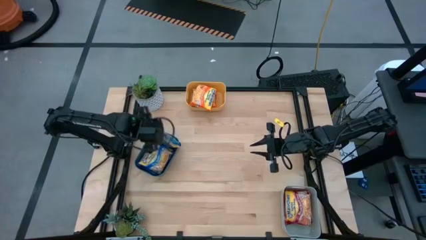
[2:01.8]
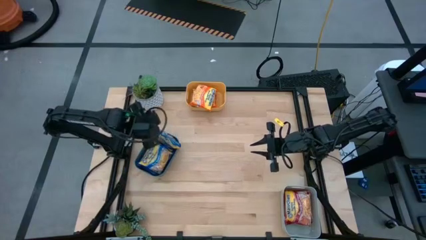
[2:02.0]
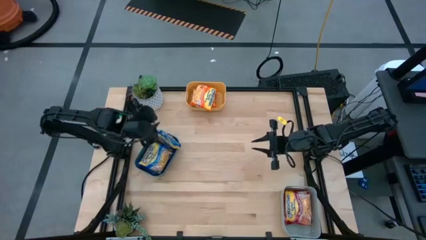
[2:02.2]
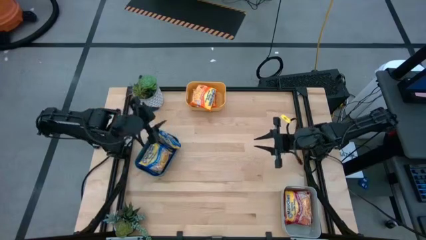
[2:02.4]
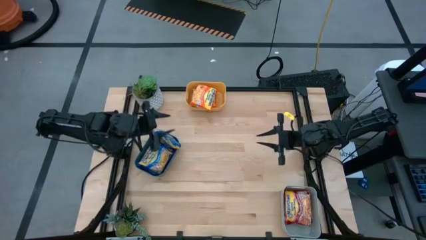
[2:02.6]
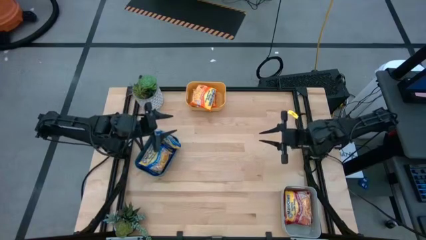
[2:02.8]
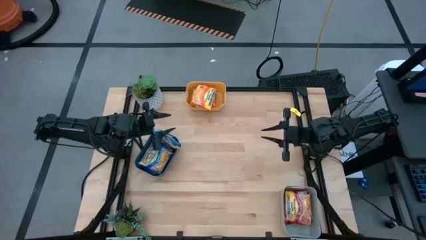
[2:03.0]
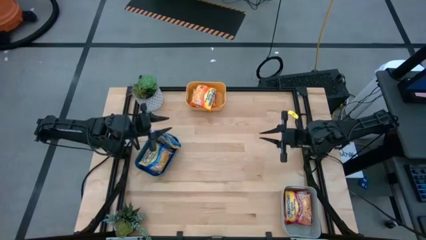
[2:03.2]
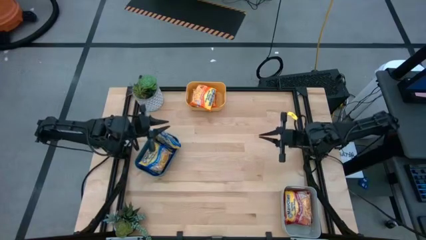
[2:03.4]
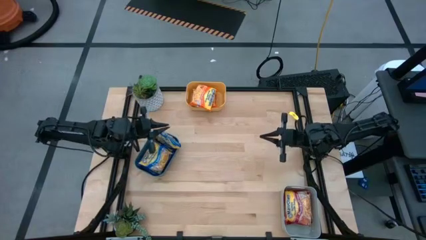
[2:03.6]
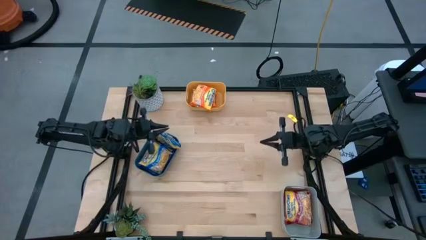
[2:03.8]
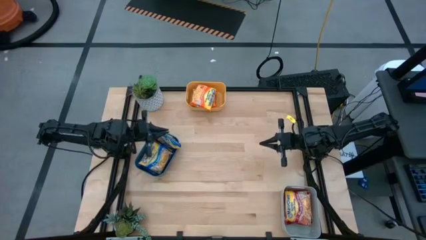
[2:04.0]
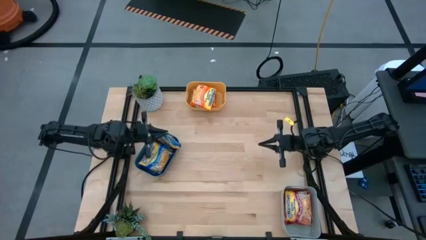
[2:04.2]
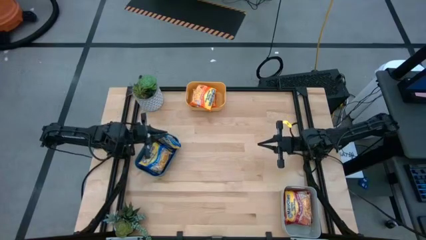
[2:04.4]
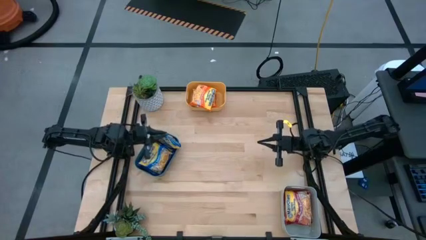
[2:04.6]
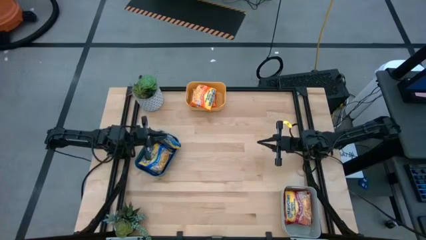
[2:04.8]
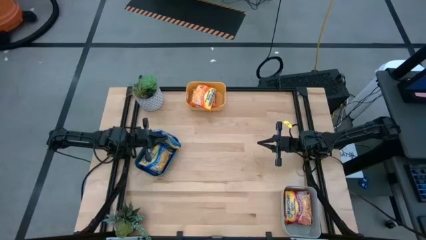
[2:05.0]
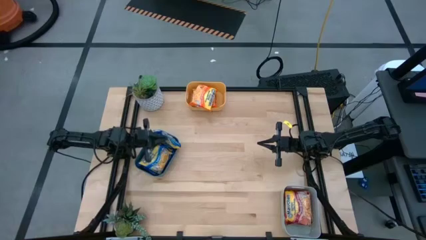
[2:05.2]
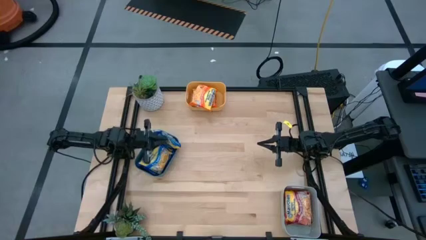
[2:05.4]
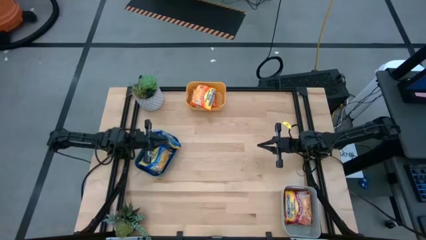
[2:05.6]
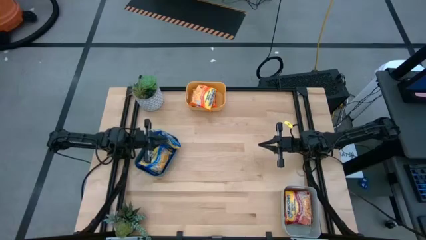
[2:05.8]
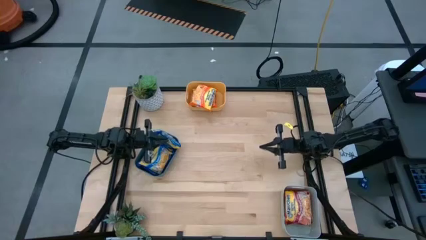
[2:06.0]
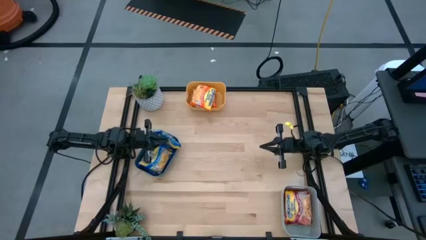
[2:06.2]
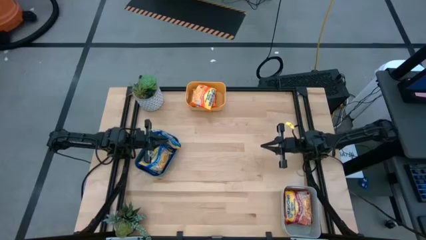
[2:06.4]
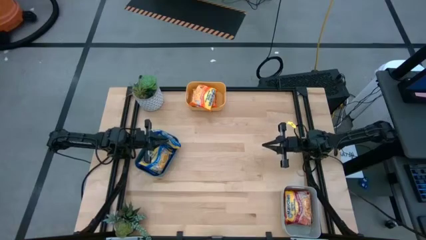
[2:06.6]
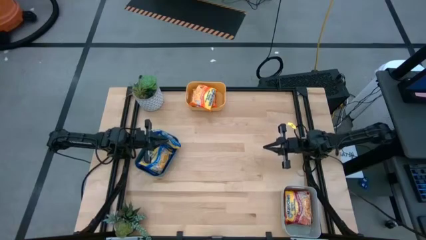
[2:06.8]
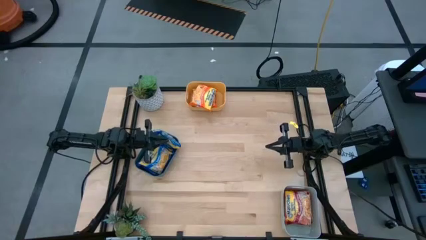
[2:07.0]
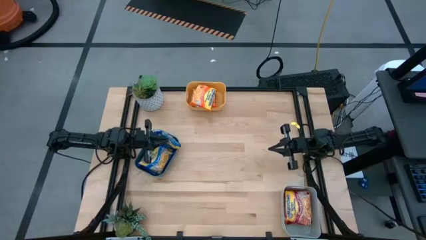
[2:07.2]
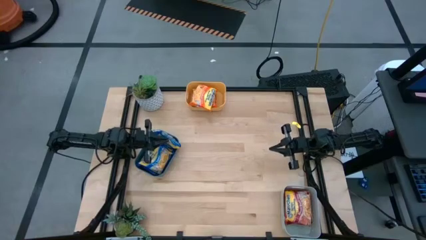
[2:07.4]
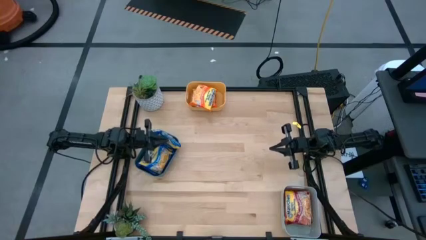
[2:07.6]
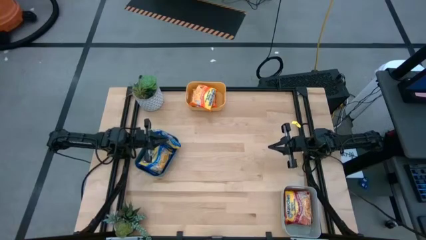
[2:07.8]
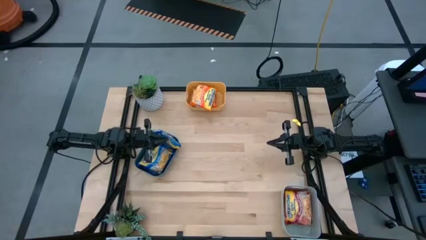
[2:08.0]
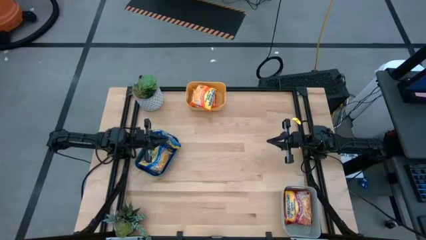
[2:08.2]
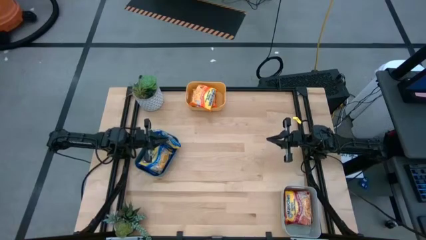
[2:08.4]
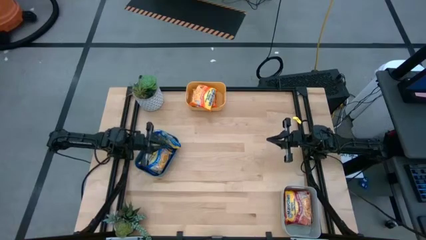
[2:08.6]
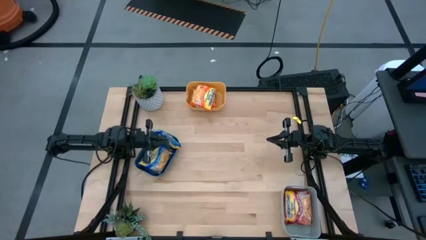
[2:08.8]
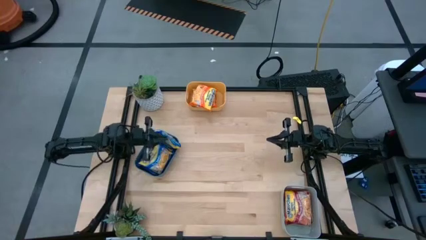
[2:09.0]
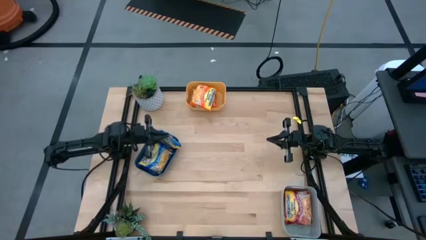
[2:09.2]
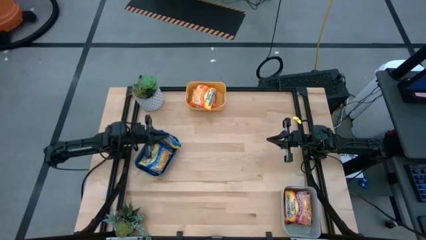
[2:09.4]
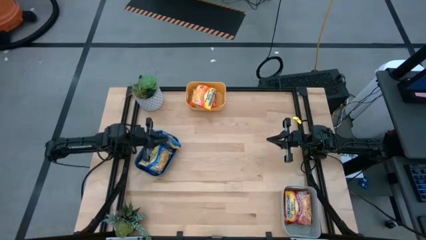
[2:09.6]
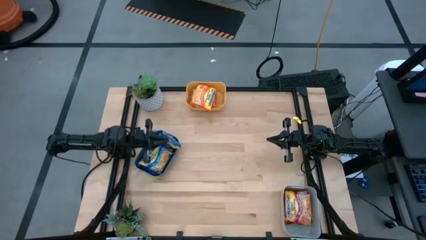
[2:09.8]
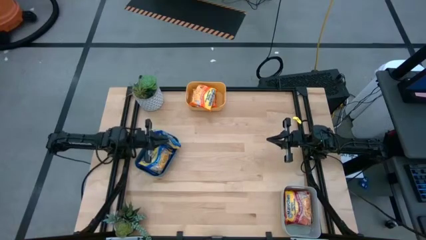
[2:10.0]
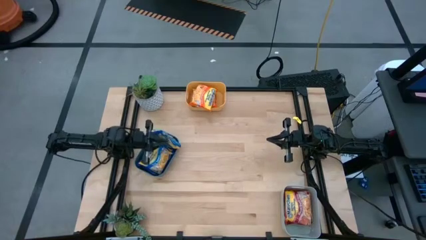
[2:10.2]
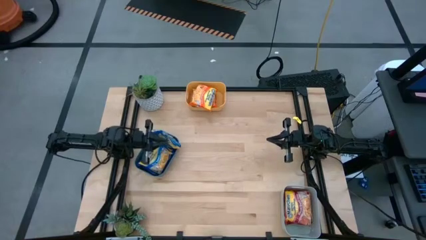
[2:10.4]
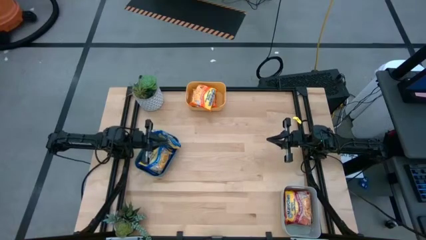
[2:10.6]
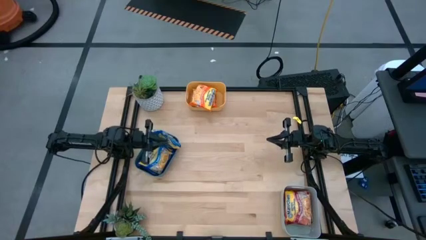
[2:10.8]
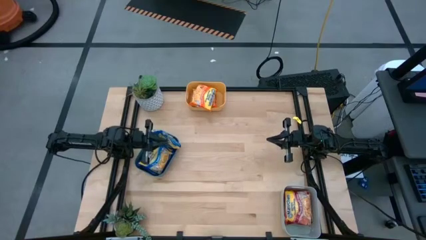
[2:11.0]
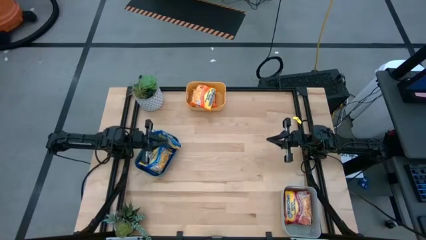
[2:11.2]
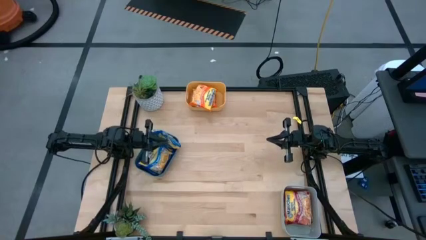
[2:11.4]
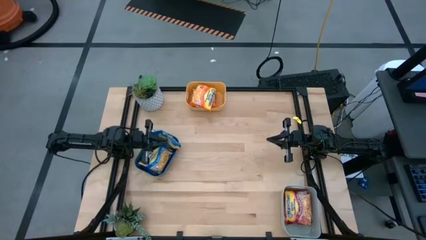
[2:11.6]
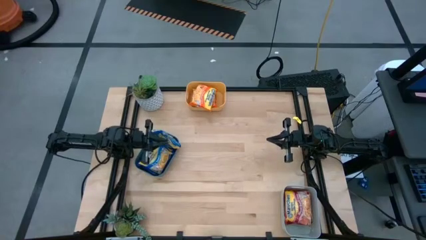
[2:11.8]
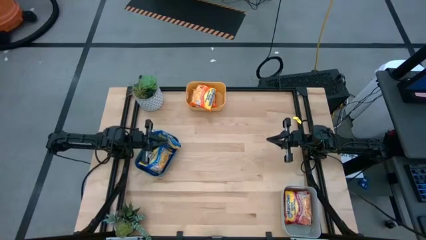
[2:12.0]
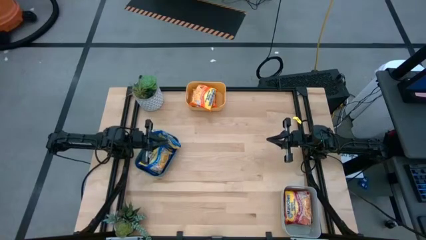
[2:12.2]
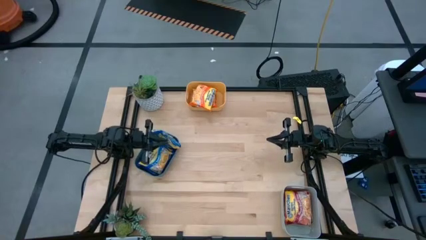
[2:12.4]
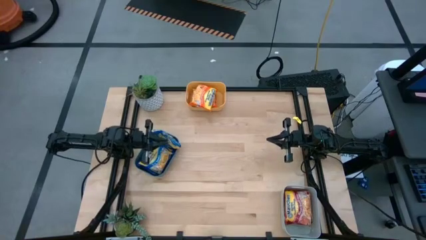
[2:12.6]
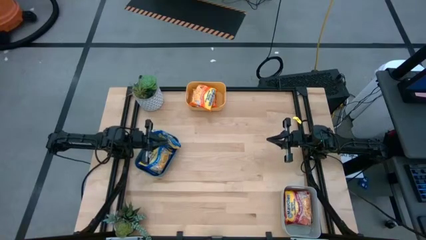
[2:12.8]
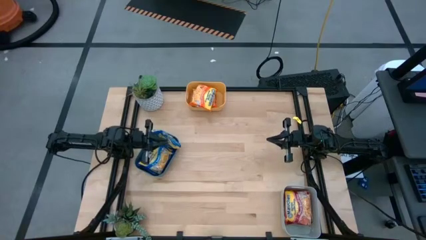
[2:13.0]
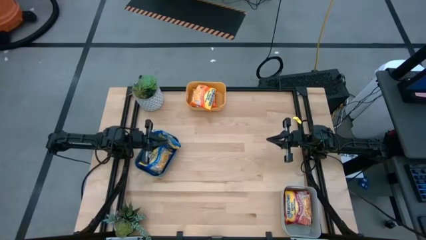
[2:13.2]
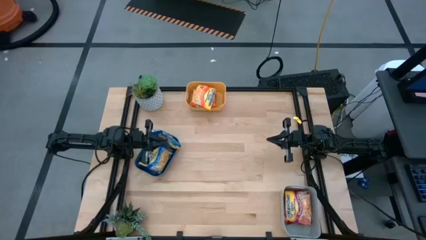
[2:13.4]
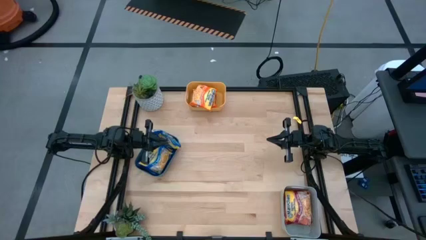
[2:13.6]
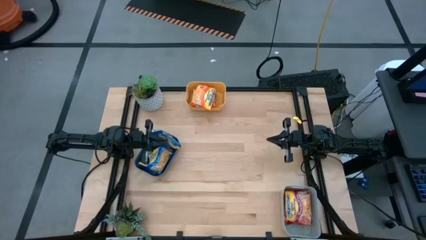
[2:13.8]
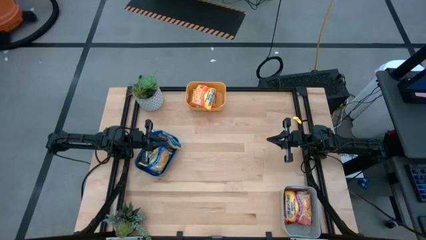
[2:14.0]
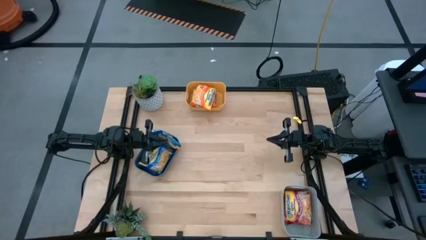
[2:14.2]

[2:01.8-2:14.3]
Task: Sort Maruchan noodles
Return to Home Position

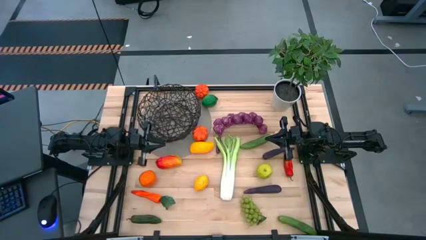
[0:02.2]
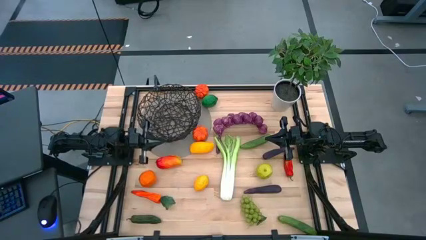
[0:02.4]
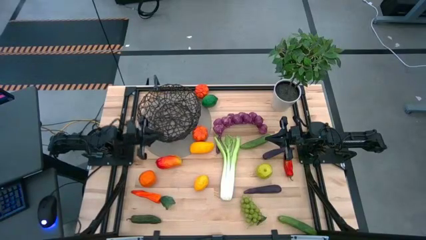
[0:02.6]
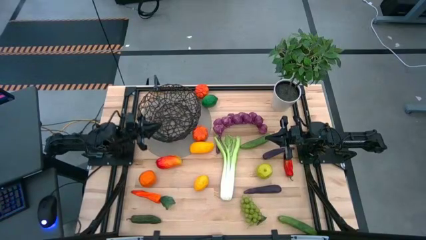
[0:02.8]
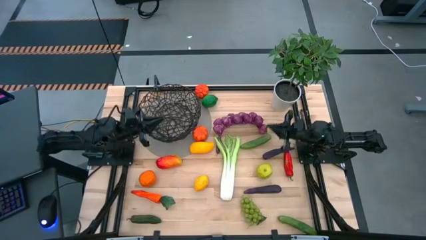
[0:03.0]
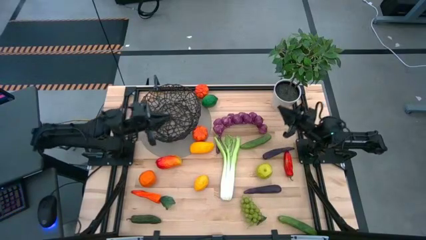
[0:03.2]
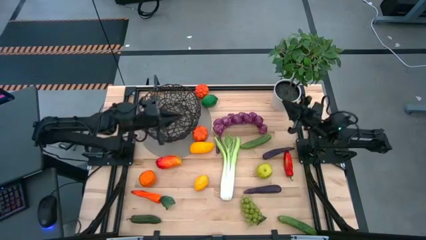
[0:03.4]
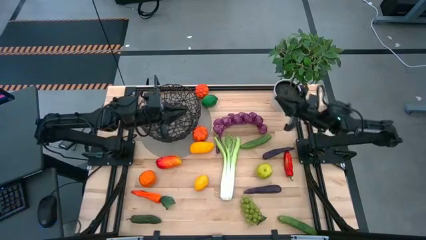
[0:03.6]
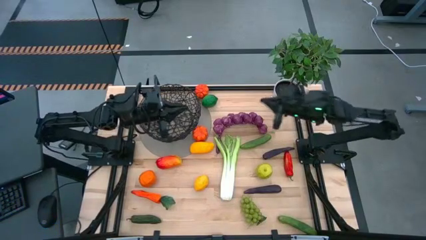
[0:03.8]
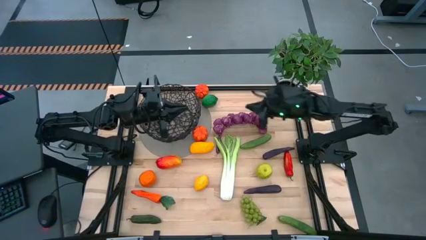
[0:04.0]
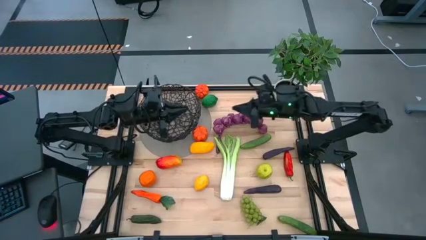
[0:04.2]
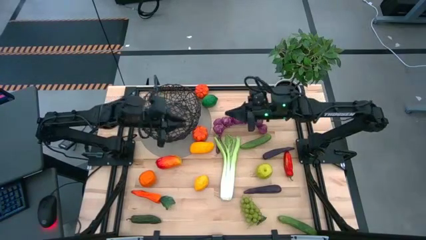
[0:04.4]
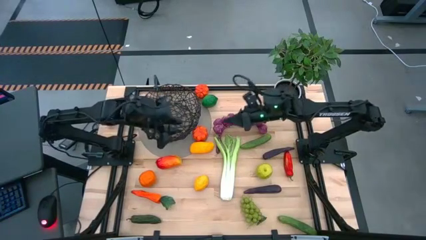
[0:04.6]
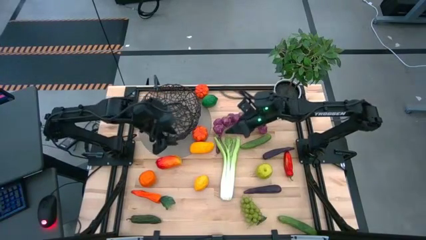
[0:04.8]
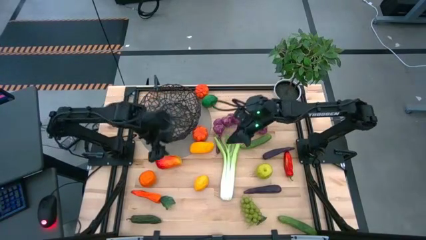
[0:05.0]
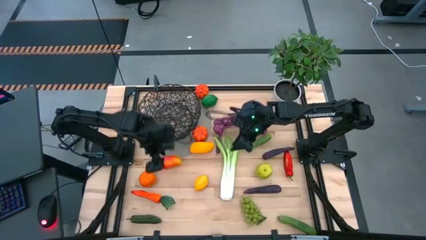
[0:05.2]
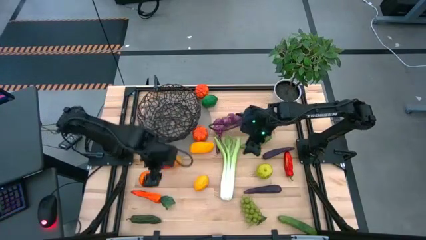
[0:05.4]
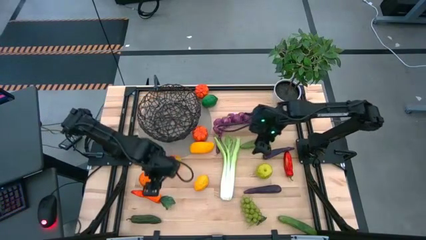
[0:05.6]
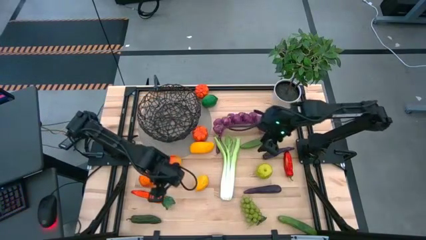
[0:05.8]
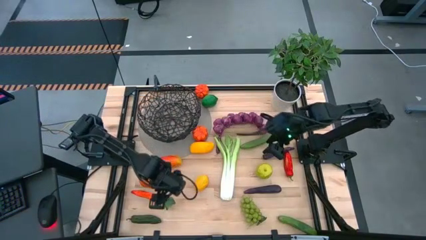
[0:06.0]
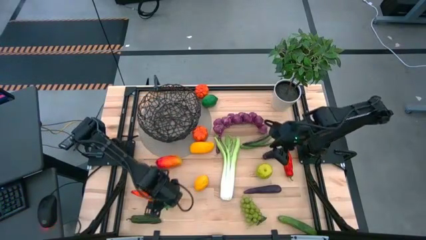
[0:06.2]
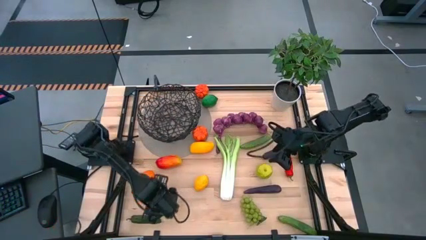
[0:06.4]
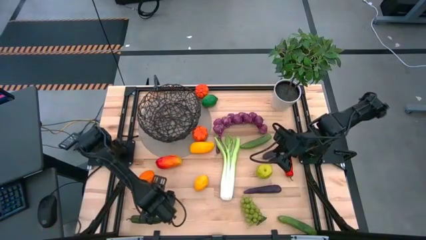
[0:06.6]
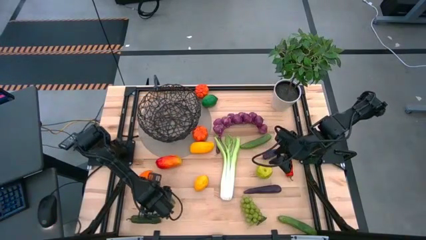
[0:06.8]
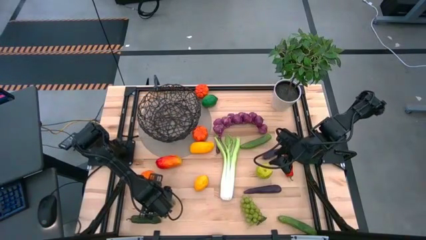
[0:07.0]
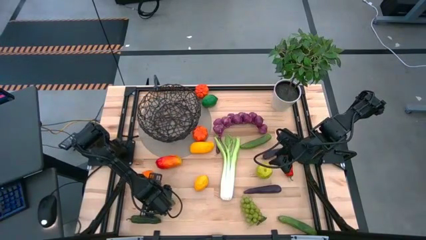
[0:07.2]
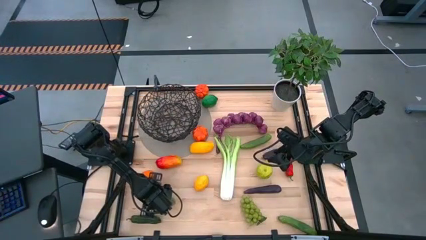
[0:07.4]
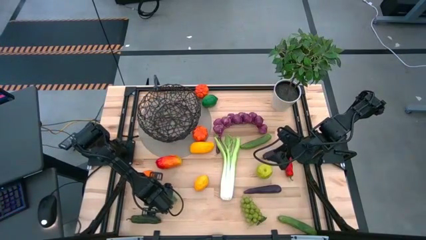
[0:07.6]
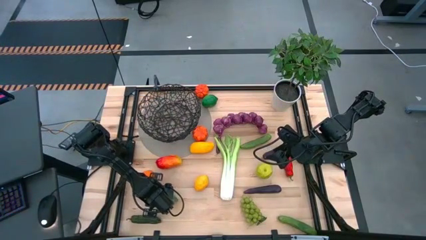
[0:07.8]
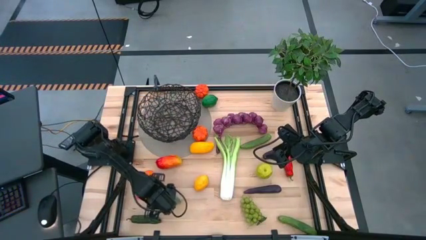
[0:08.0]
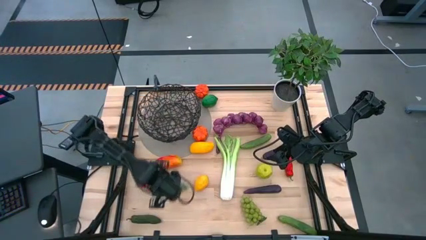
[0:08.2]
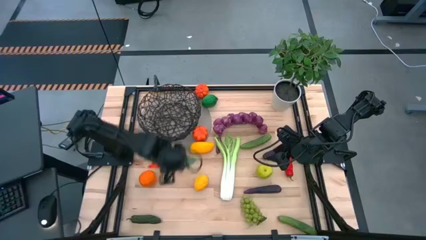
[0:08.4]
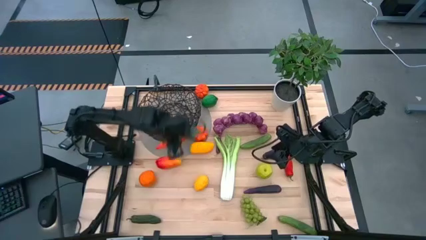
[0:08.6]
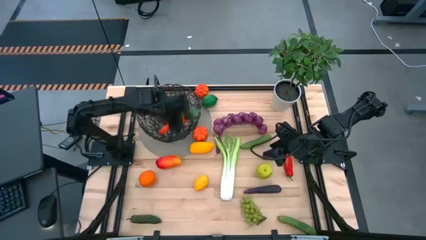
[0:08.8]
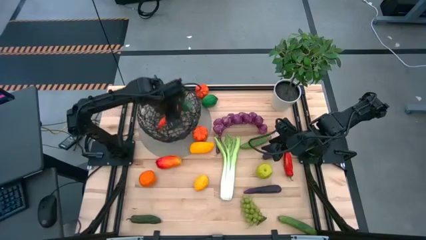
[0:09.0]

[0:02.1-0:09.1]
Task: Build produce basket
Put the orange carrot into the wire basket
